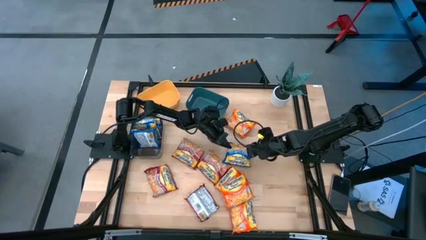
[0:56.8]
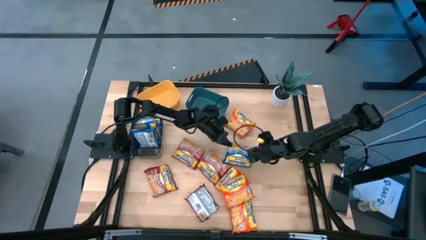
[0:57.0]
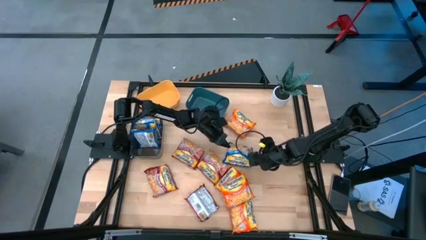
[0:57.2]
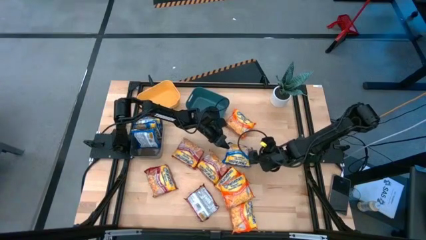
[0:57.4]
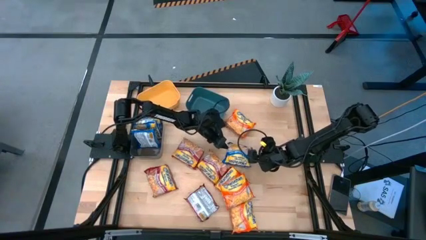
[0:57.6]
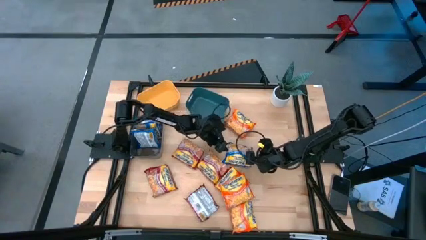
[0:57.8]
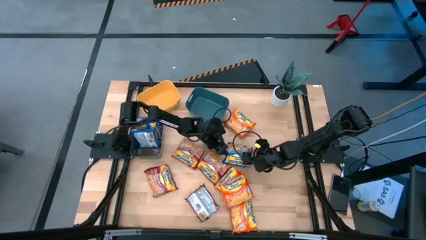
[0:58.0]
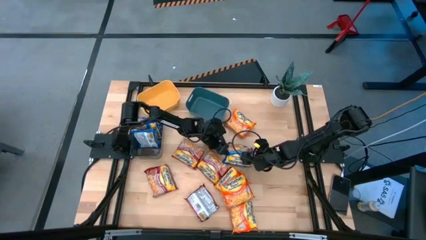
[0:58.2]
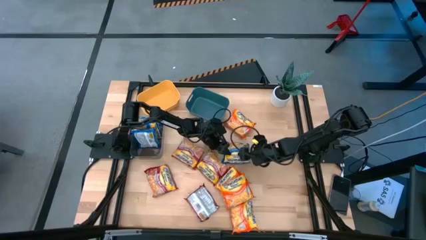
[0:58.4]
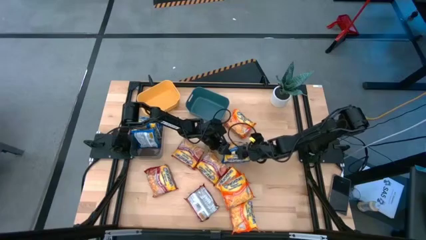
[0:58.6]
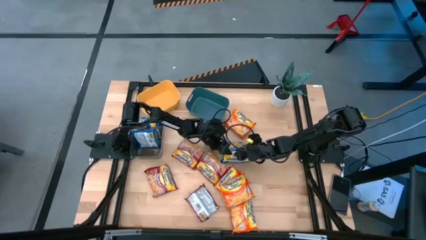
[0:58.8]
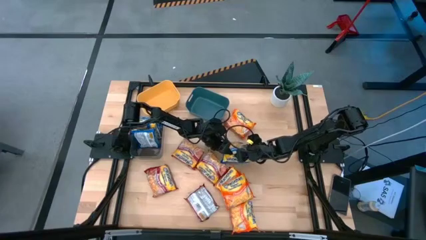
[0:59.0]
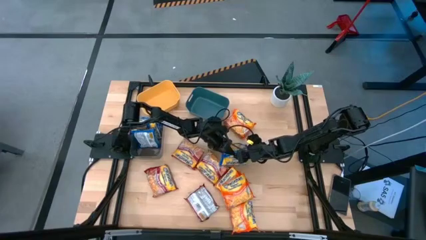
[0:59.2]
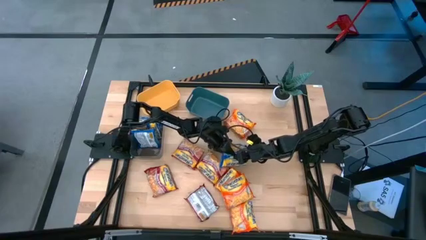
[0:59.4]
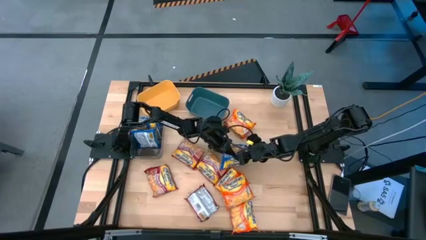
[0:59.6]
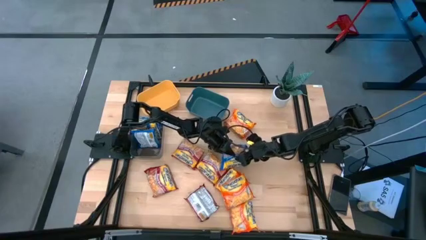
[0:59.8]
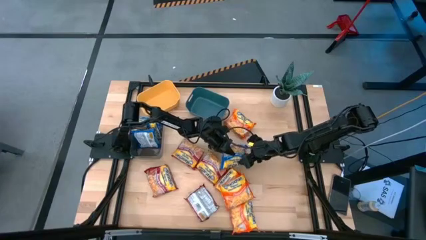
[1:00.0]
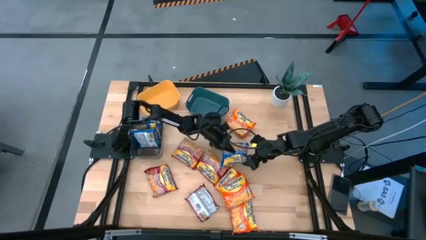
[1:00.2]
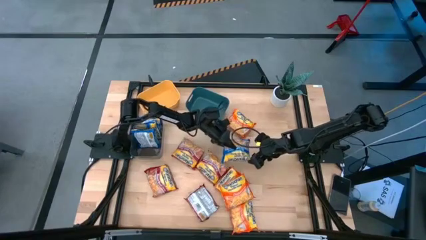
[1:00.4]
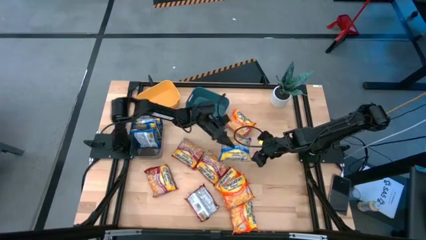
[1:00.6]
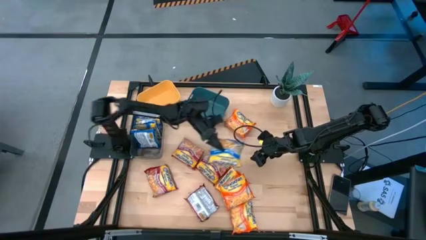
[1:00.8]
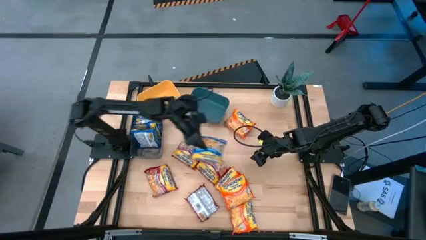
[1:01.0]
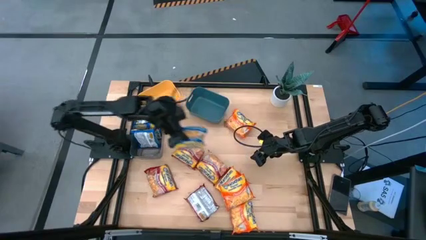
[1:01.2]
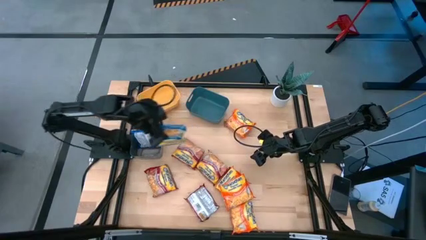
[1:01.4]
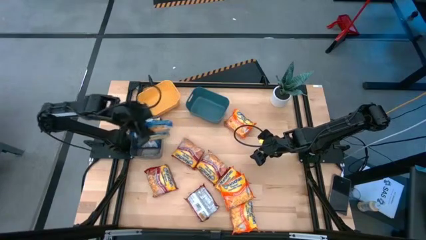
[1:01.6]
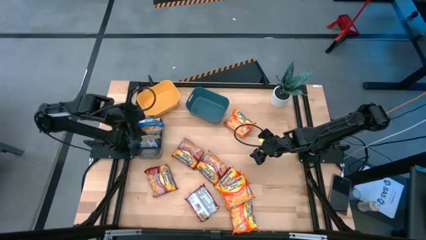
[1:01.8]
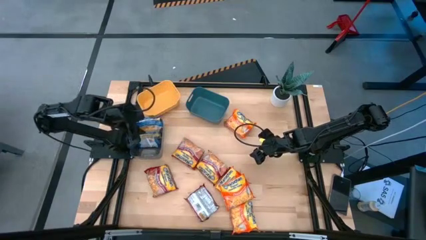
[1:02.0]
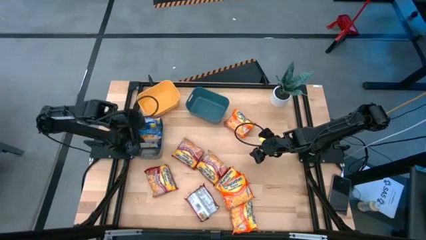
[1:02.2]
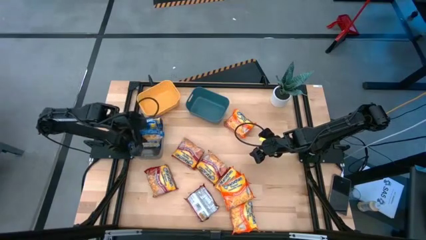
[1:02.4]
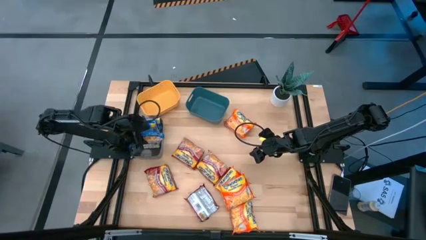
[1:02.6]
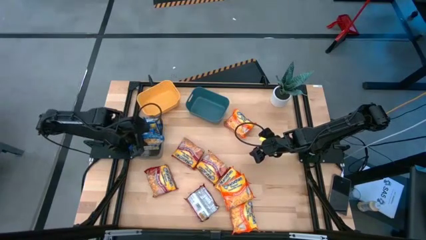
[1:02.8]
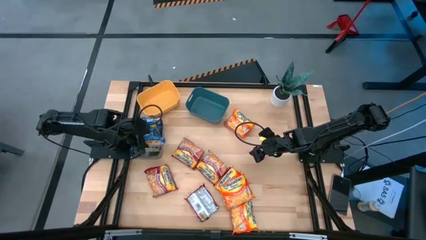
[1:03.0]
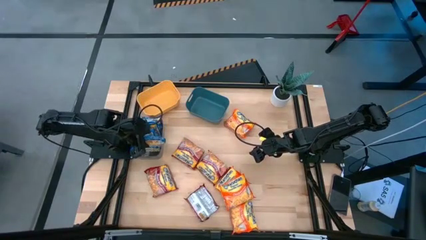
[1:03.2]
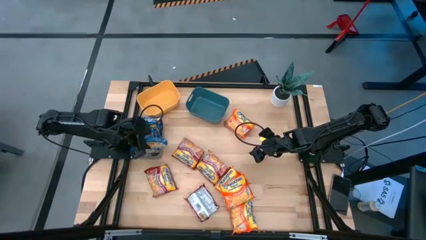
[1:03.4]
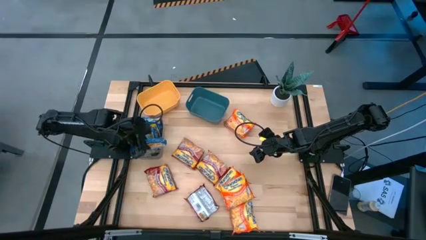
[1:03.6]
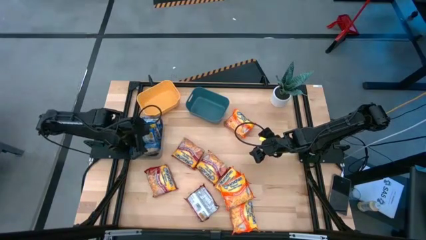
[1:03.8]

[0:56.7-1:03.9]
Task: Sort Maruchan noodles
Put the blue noodle pack into the black bin

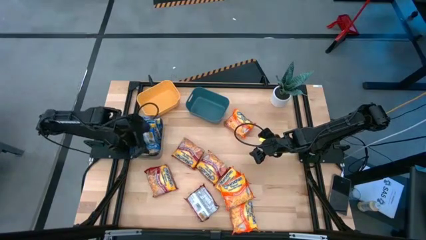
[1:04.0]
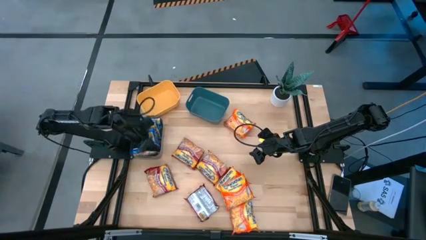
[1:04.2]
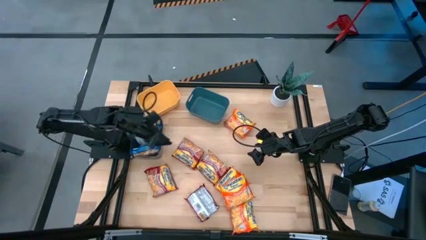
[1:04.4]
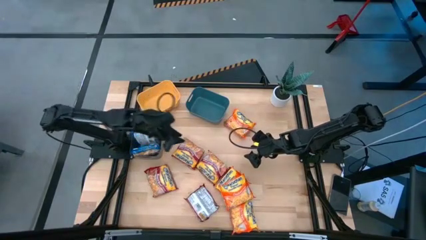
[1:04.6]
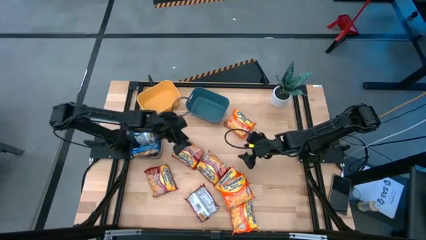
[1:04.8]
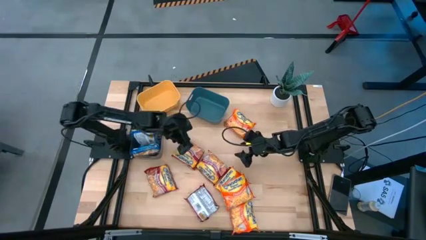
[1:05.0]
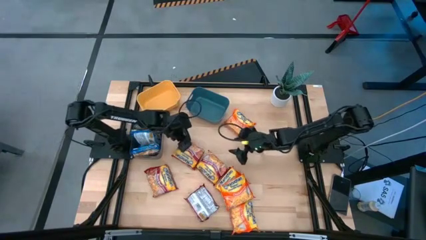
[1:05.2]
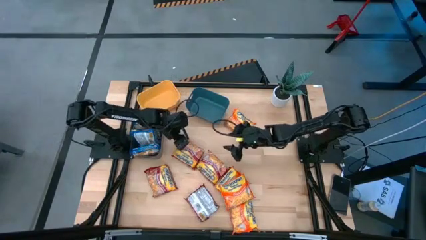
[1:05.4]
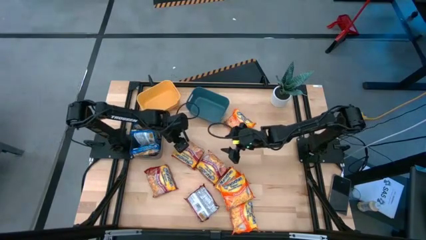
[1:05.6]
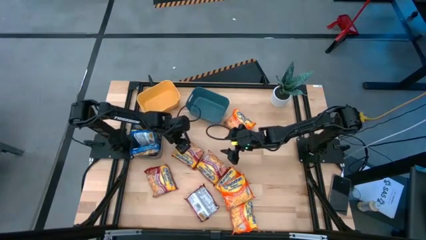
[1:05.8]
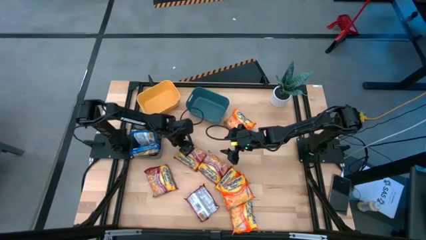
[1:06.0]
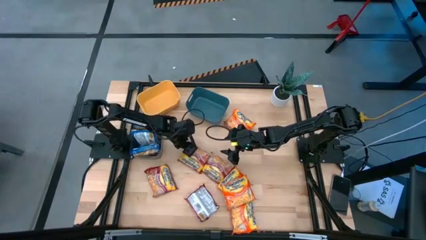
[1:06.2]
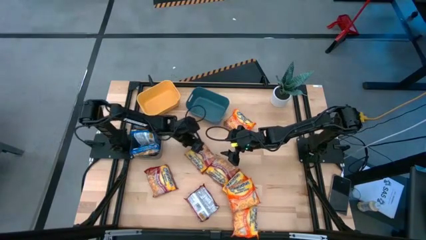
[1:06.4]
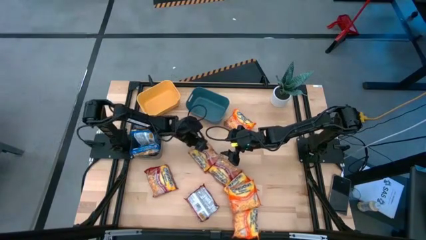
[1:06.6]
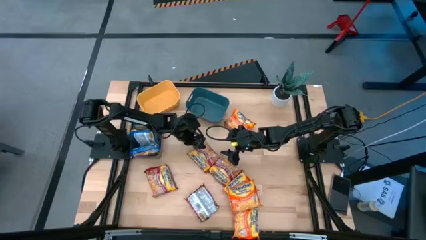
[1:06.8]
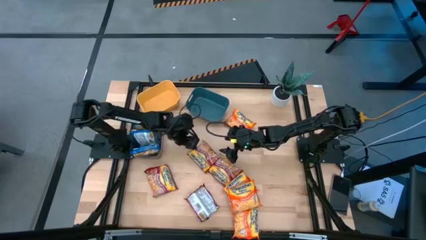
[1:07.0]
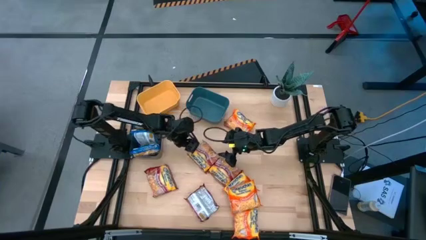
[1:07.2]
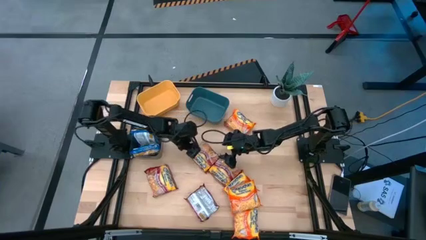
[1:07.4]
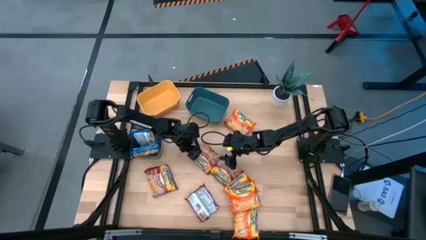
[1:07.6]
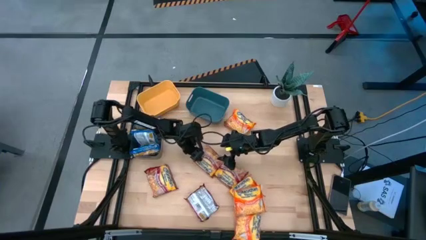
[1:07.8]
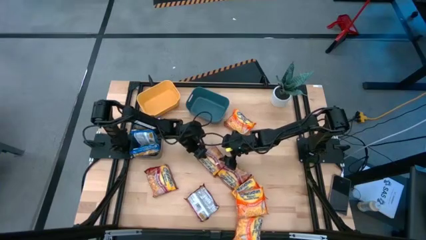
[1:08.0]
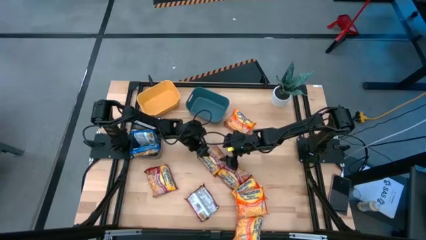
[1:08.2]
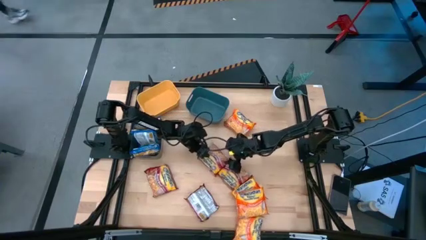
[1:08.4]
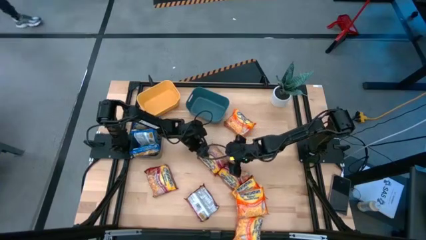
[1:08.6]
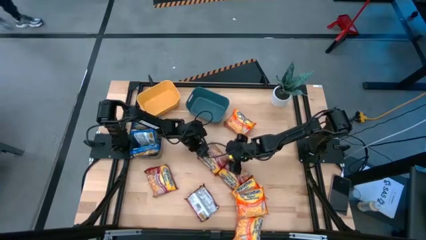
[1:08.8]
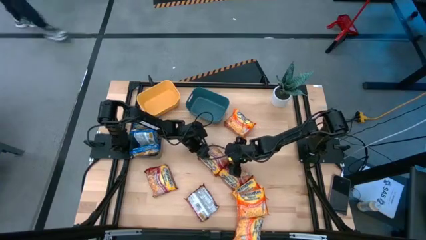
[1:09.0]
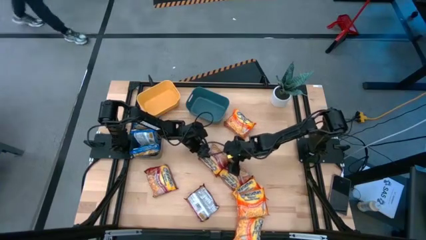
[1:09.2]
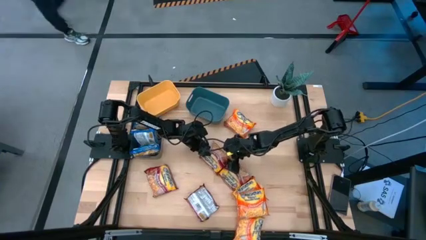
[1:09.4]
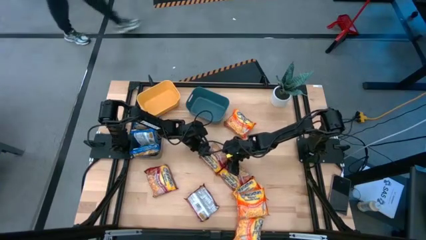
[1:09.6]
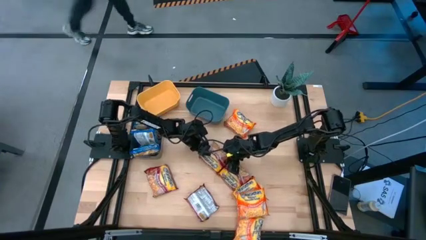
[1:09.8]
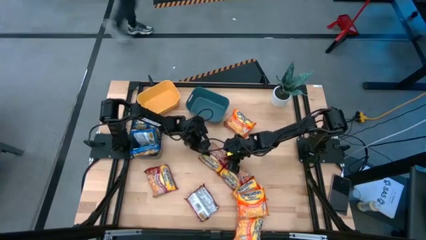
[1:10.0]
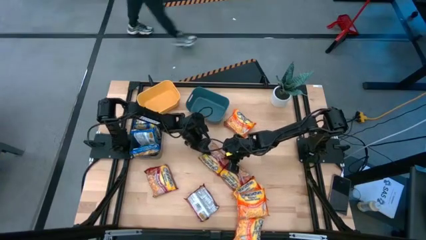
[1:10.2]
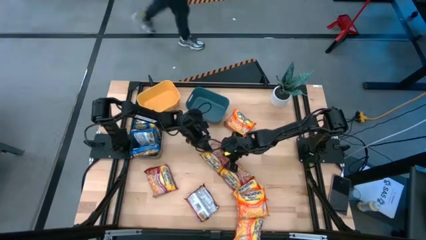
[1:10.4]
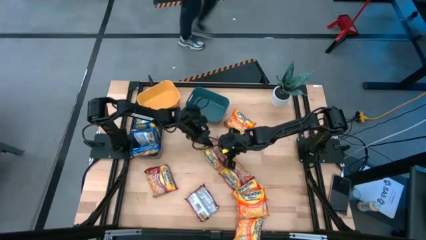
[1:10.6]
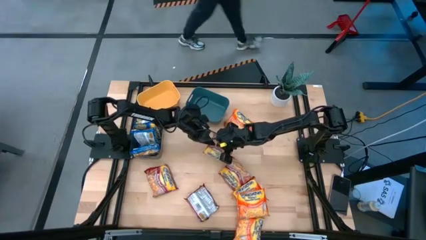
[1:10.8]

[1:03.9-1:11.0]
Put the red noodle pack into the yellow bin
